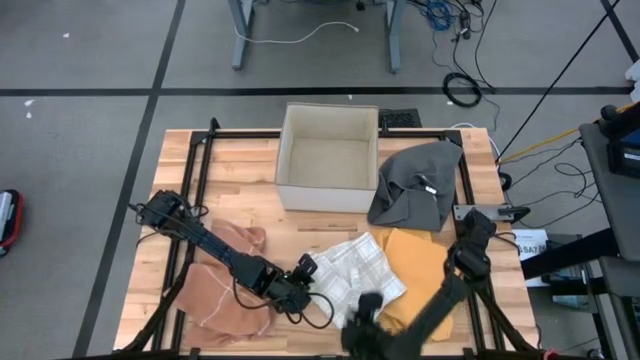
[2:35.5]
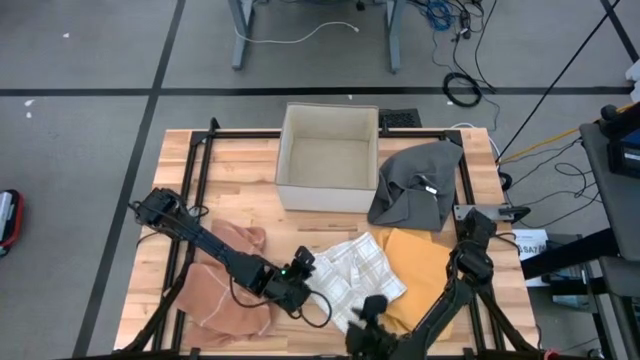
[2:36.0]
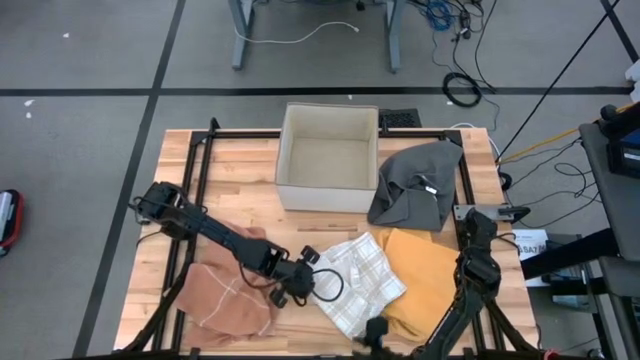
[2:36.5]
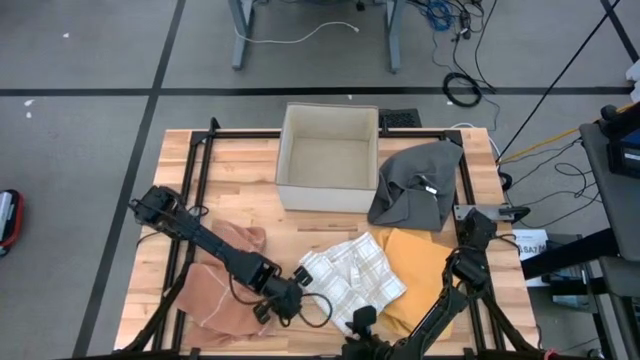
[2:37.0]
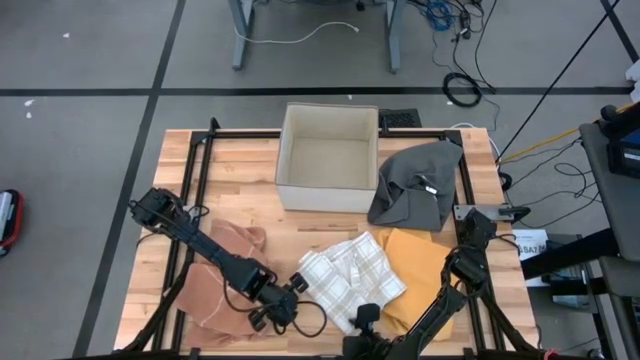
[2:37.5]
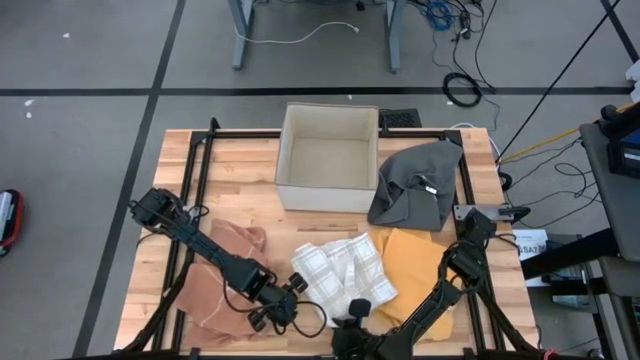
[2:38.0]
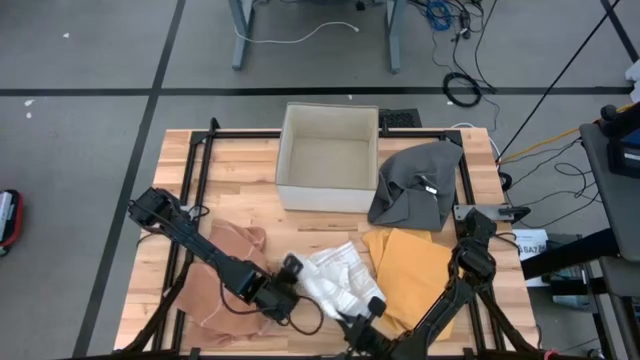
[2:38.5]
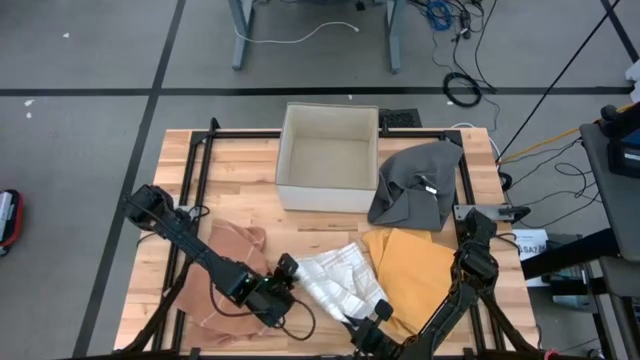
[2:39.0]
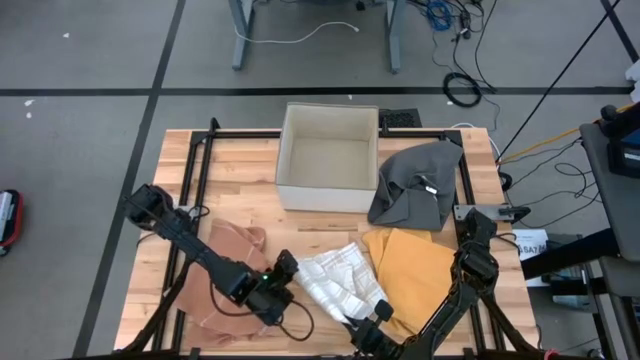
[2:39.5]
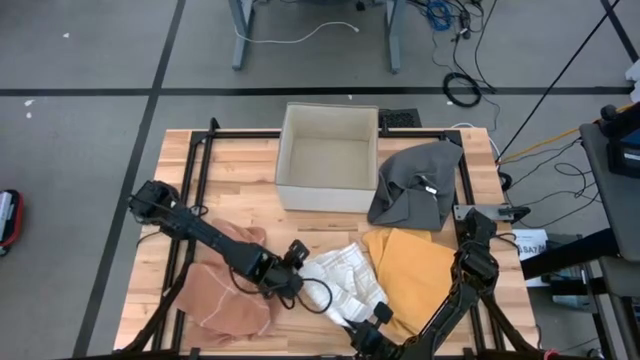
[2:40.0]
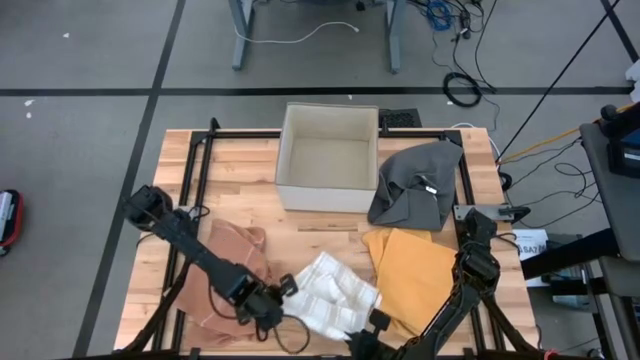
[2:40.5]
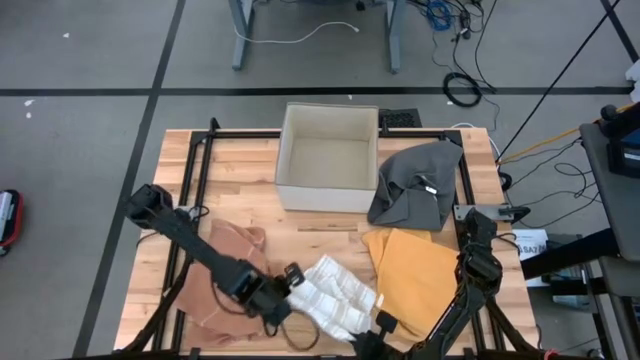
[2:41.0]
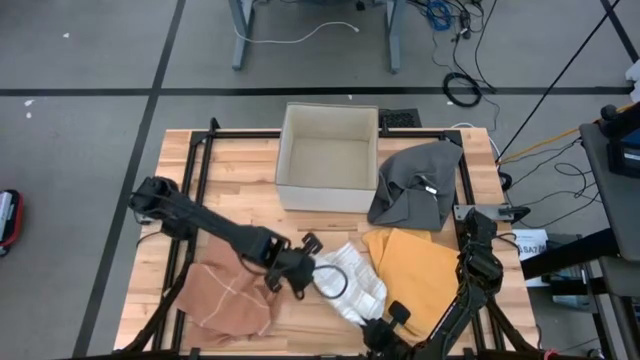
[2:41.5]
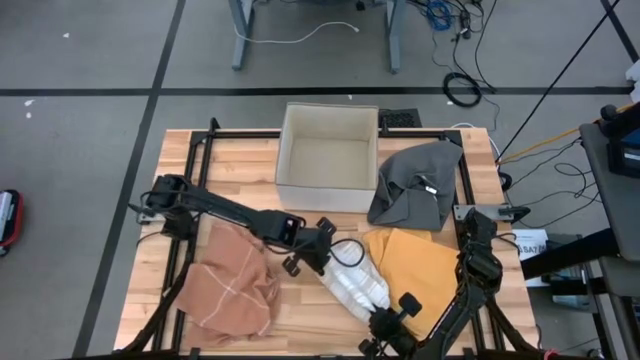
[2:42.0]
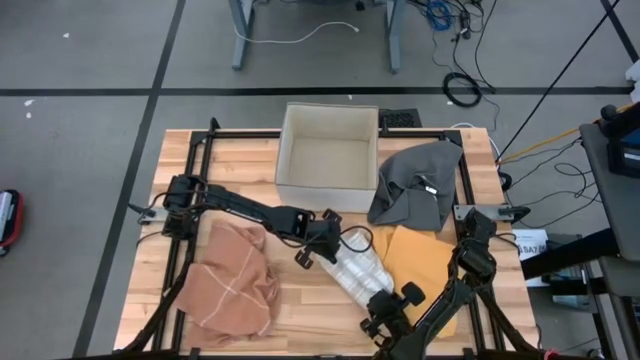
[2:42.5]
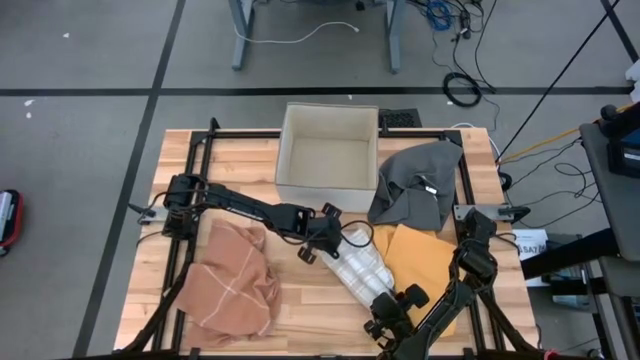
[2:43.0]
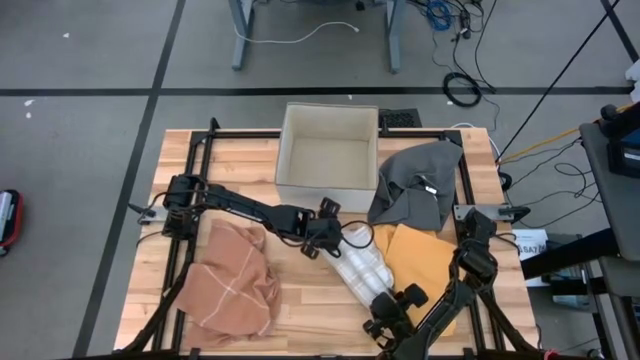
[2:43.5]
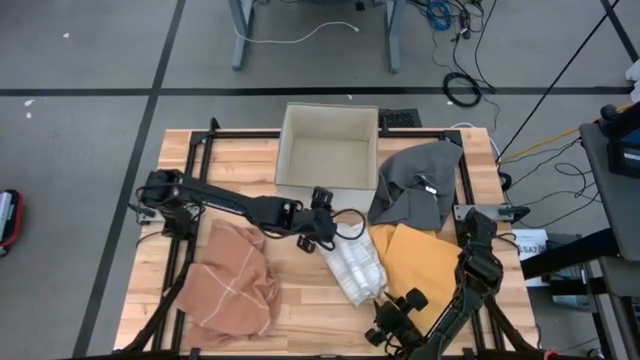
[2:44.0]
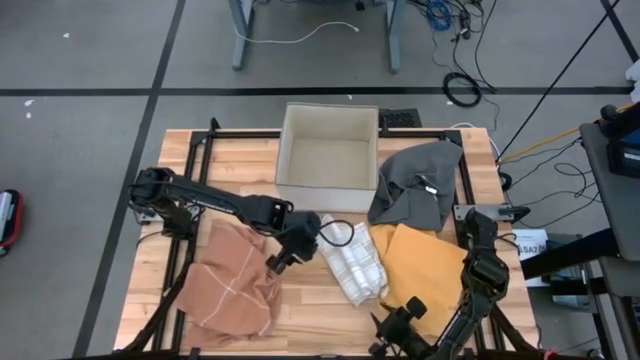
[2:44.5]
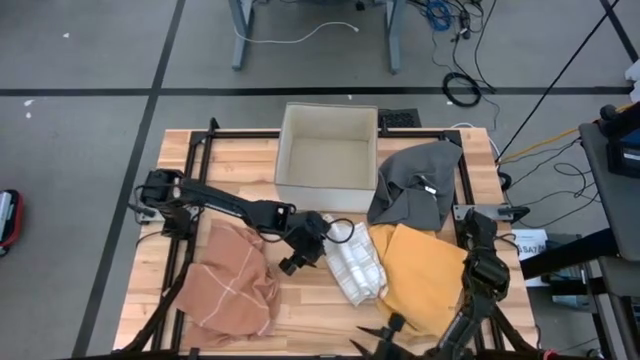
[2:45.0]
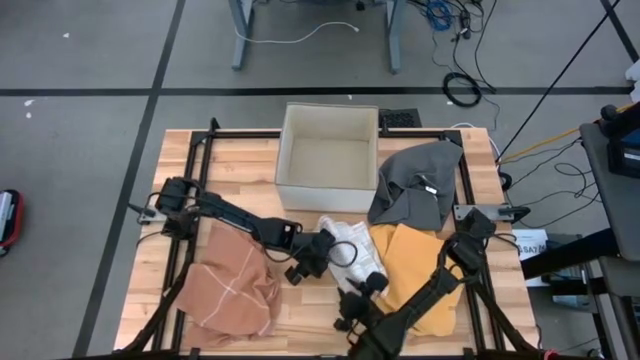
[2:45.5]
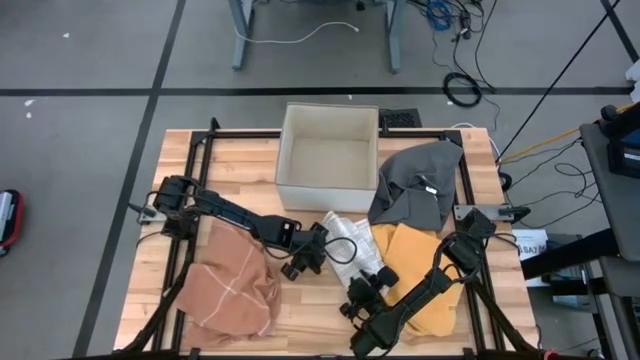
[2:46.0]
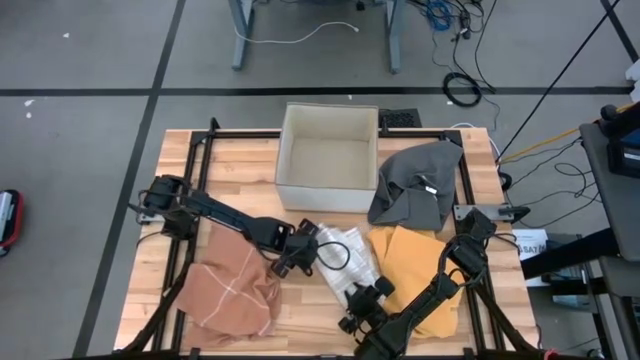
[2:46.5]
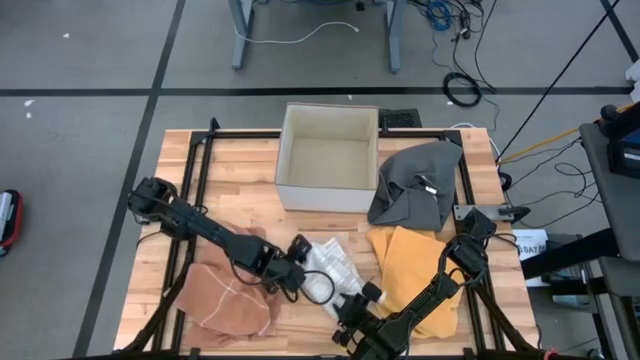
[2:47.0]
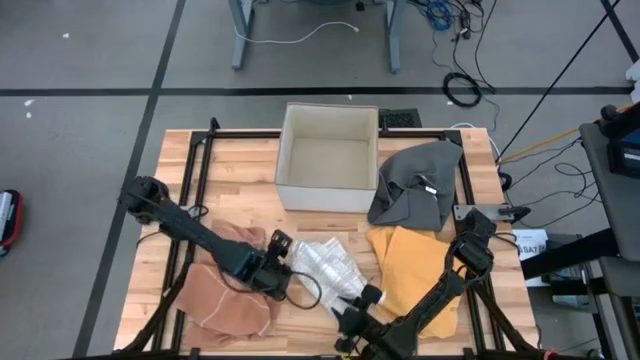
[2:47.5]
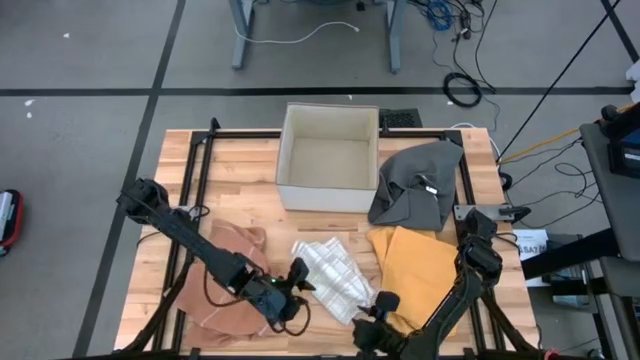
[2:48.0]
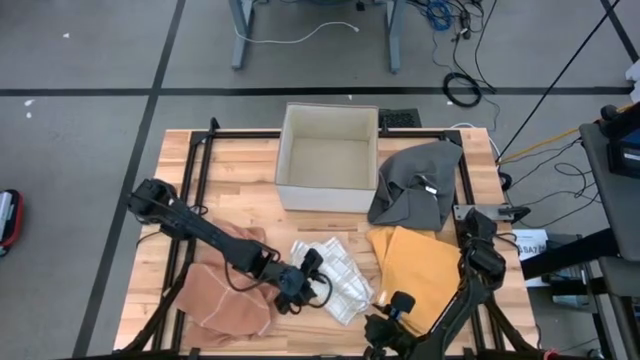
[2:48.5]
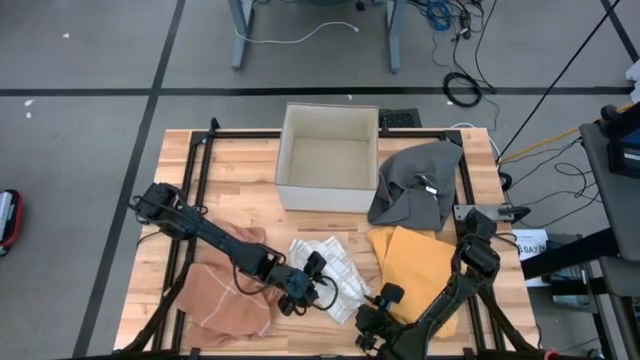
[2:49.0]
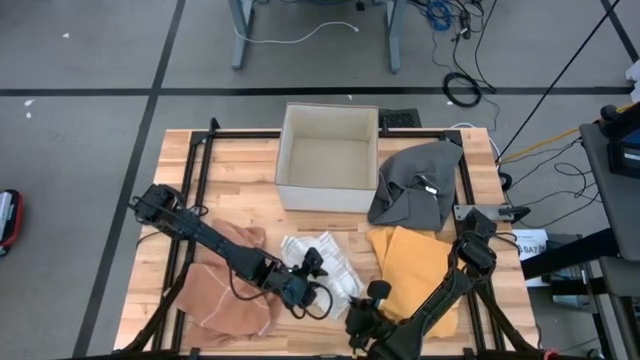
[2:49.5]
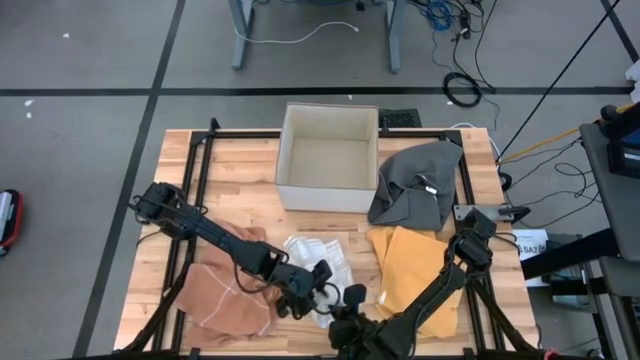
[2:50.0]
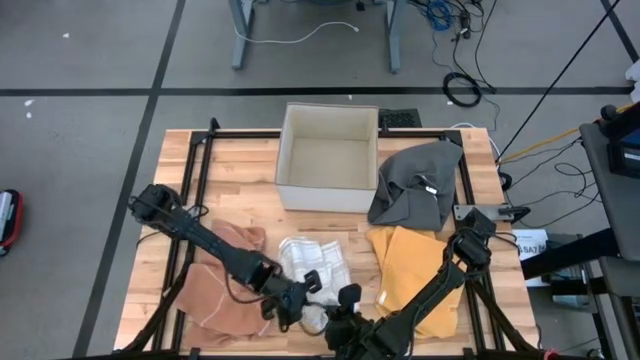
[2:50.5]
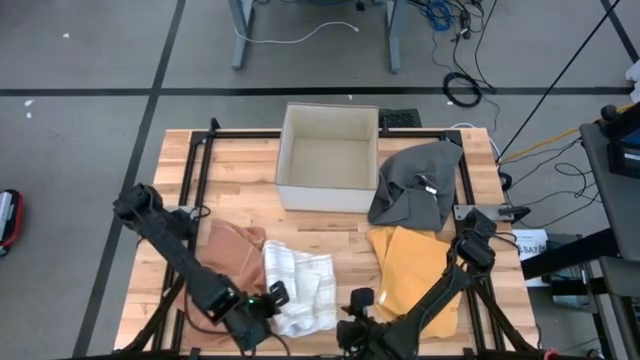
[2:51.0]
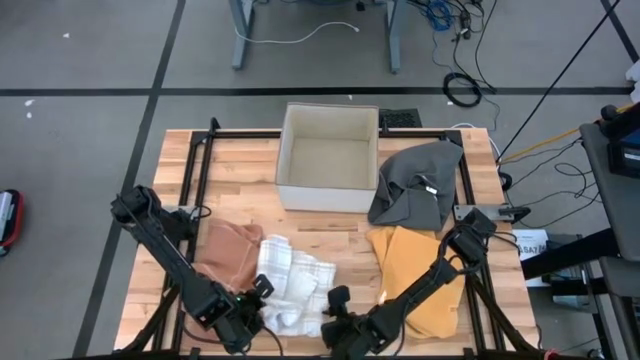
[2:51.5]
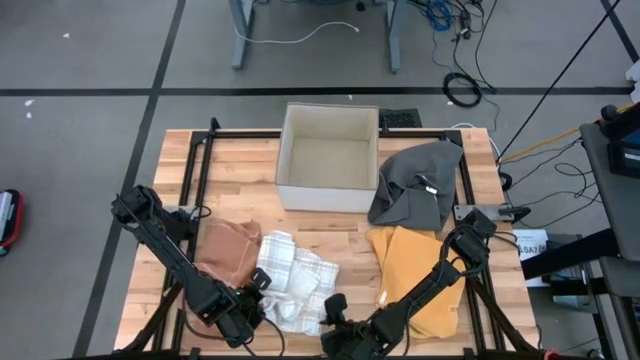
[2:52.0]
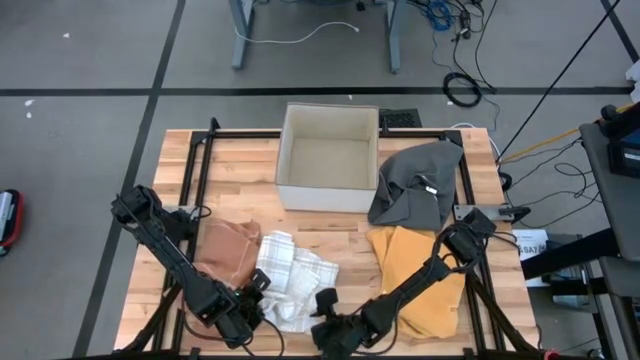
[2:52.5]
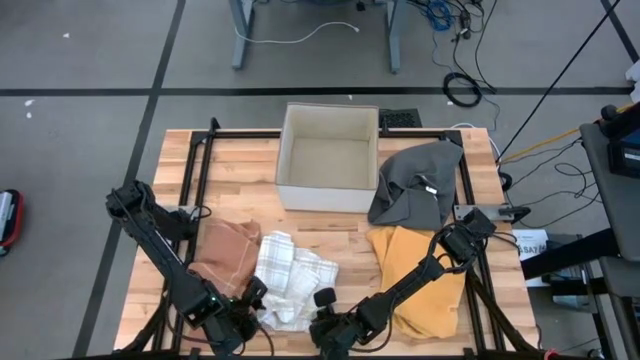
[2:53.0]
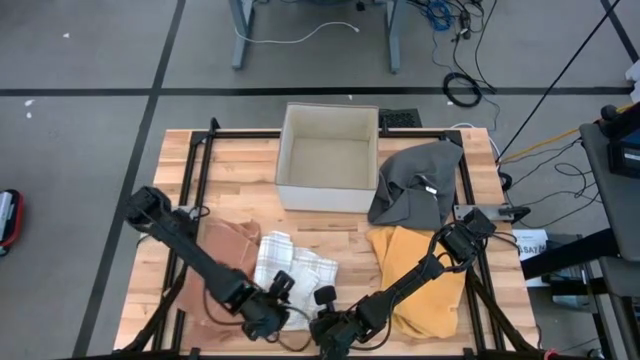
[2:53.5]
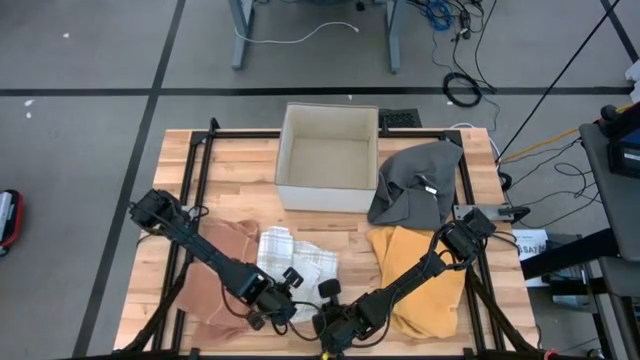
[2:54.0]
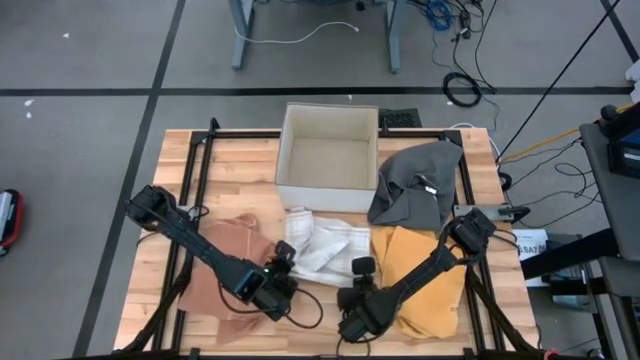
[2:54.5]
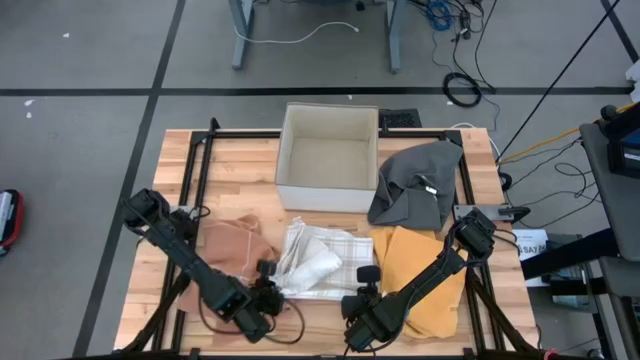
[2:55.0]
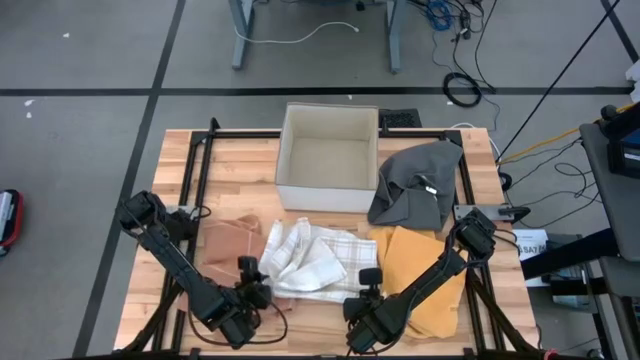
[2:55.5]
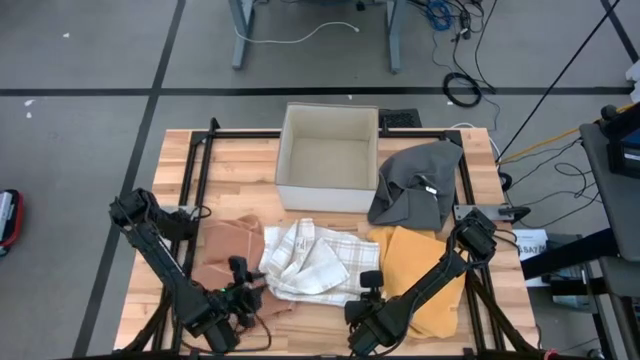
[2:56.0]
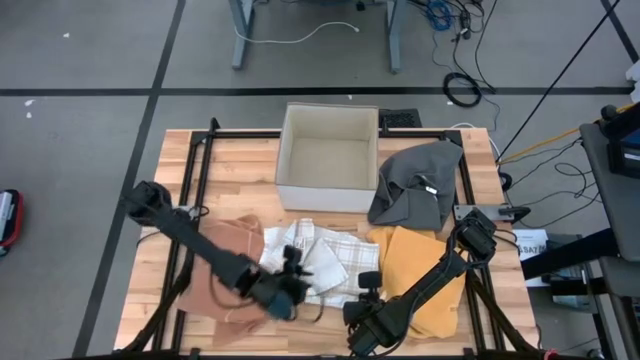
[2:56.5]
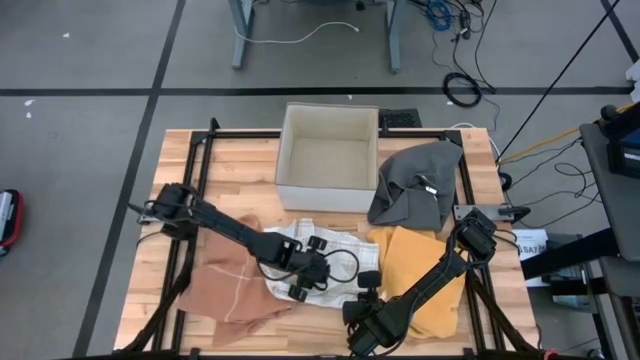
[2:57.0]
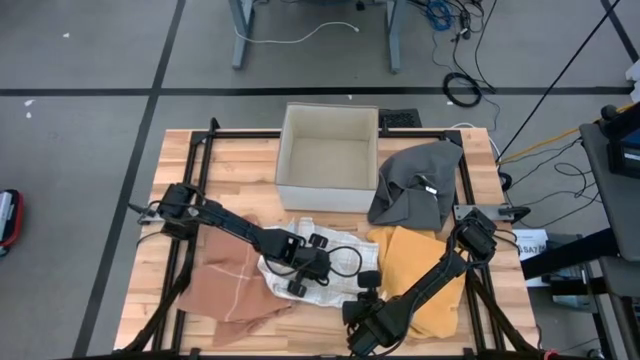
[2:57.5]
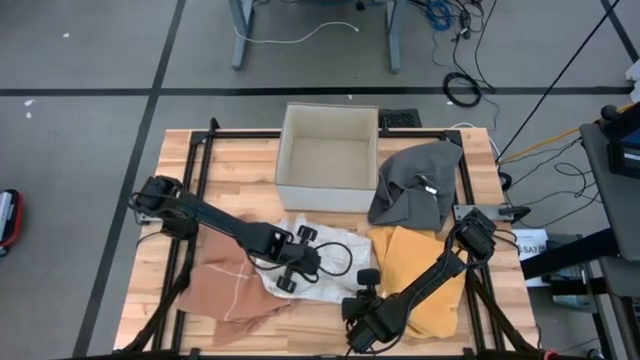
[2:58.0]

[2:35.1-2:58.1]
Task: Fold towel
Fold the white patterned towel
